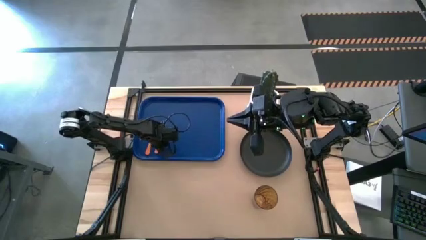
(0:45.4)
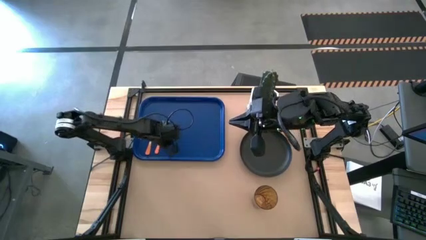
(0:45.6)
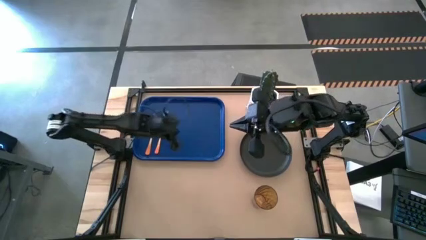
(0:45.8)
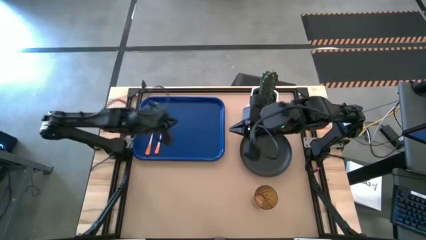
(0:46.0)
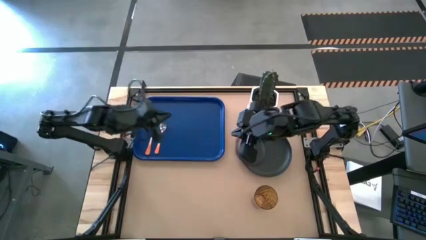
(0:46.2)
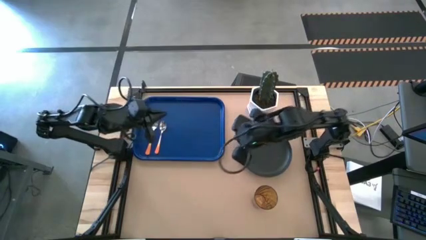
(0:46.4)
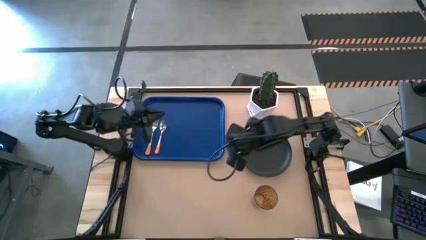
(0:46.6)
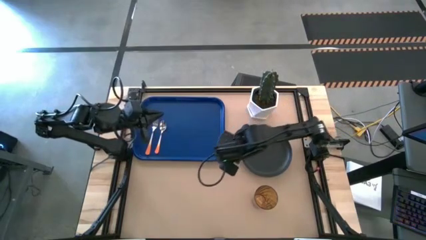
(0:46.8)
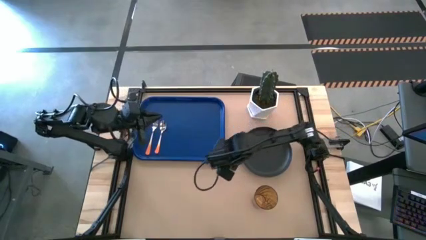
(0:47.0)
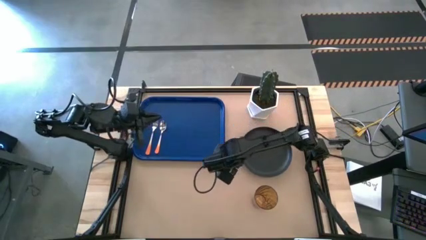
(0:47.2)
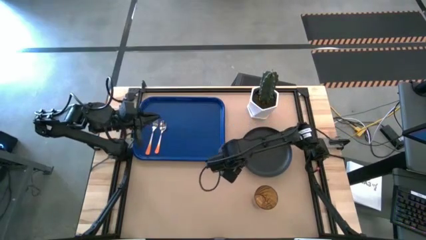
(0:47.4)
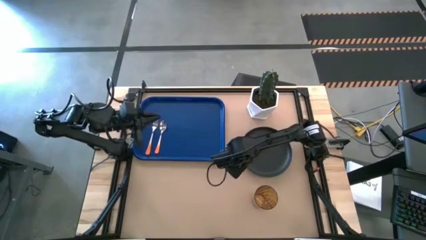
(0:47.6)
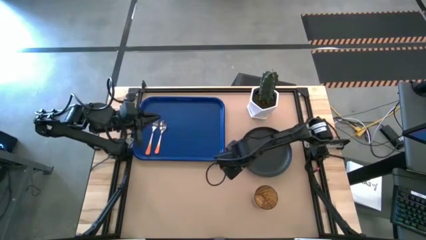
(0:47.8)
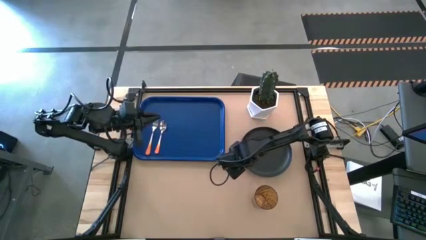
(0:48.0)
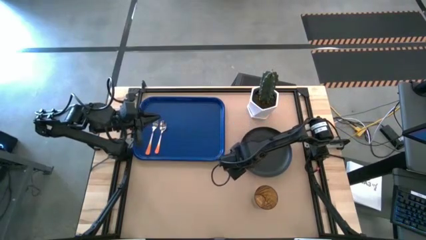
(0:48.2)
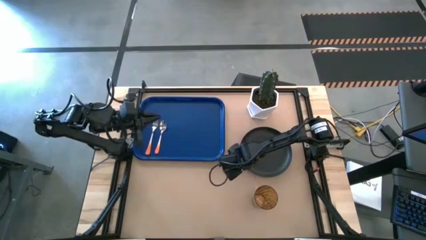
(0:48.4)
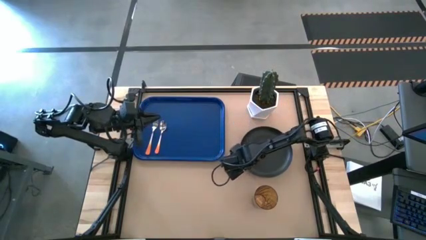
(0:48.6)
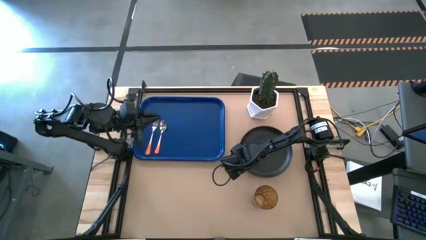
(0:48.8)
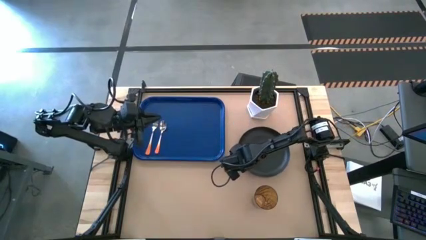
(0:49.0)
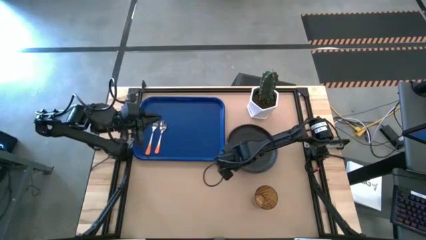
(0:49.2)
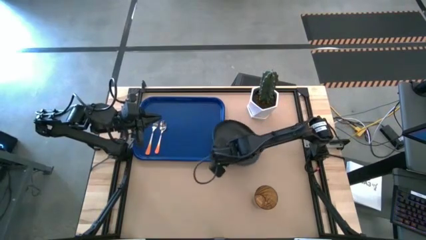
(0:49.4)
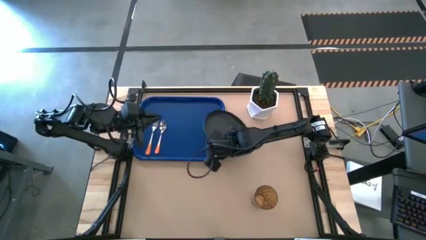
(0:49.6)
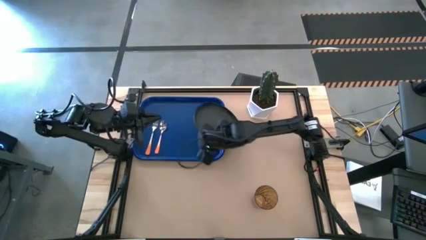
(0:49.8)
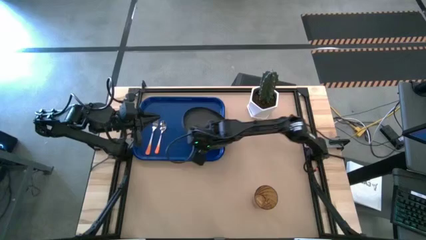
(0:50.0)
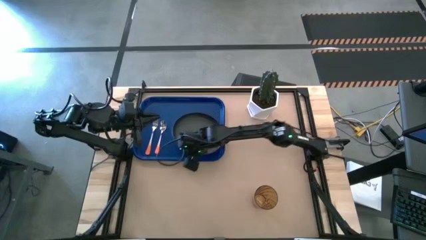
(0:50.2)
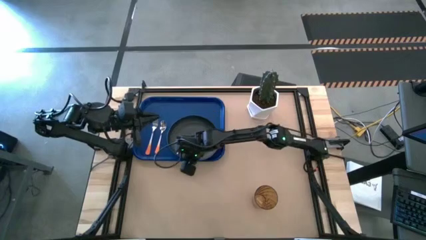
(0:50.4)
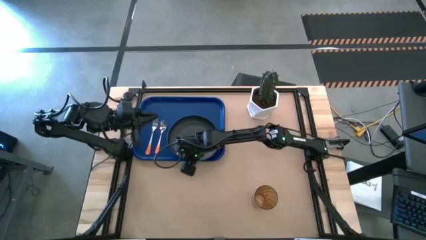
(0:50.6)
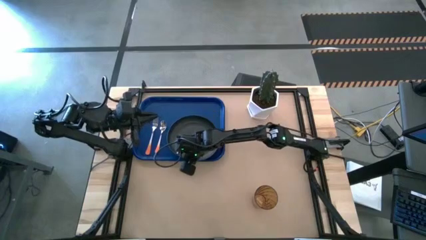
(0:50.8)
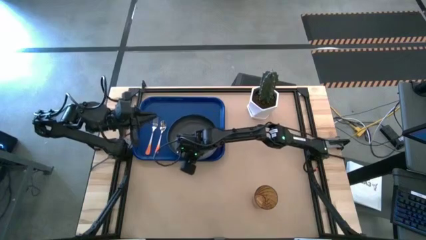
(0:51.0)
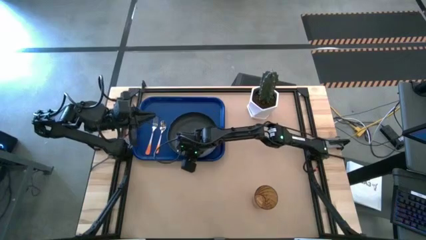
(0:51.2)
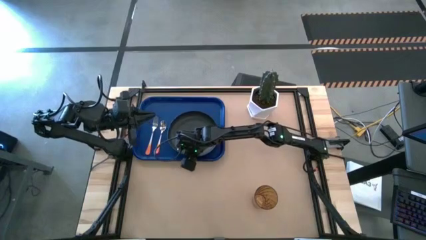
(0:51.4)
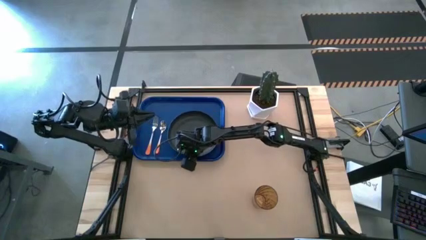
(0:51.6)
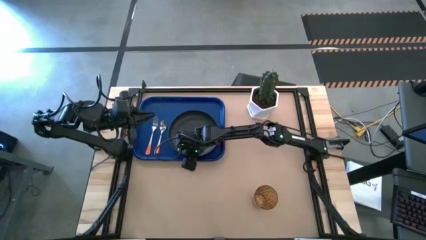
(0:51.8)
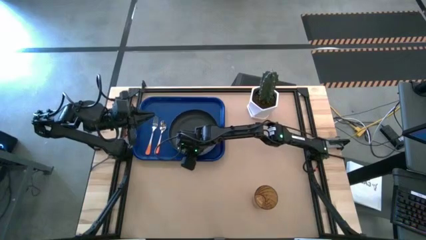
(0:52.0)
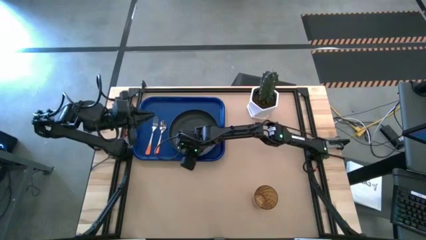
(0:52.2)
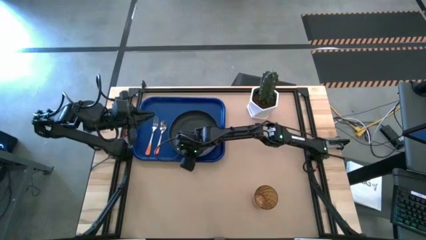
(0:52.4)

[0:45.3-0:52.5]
Task: Pick and place plate/cup/fork/spoon on tray
Put the black plate on the blue tray on the right of the orange spoon

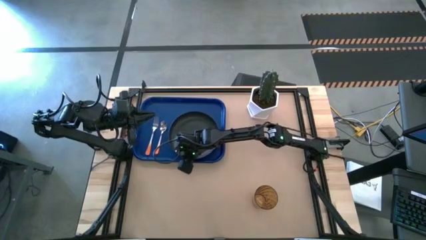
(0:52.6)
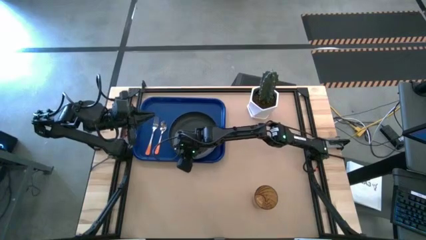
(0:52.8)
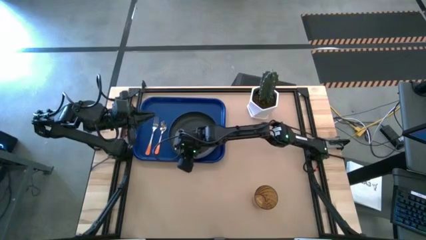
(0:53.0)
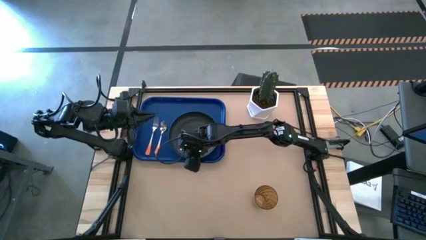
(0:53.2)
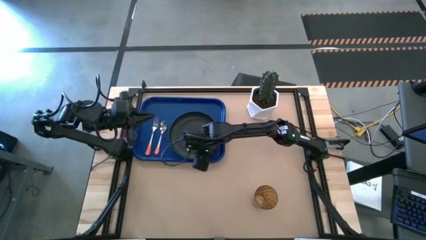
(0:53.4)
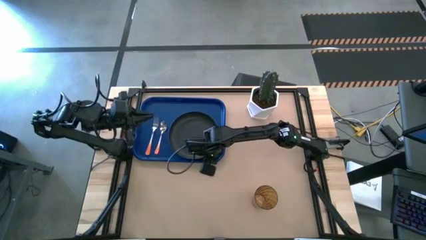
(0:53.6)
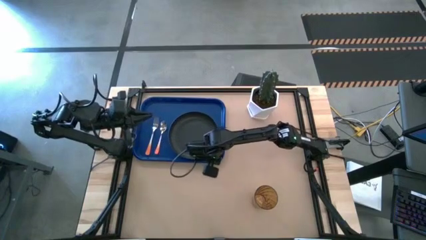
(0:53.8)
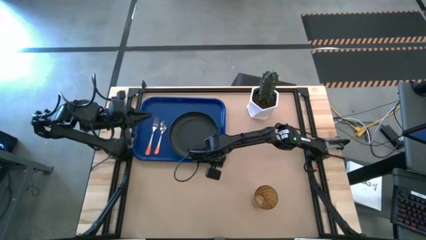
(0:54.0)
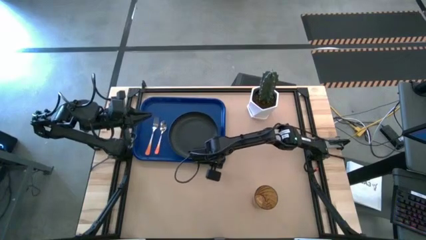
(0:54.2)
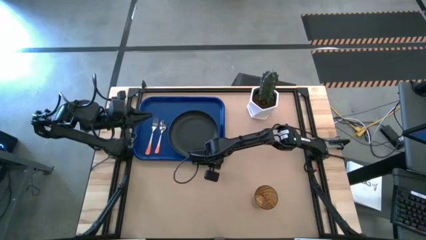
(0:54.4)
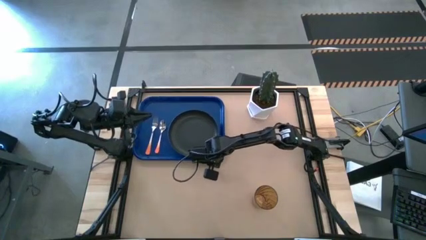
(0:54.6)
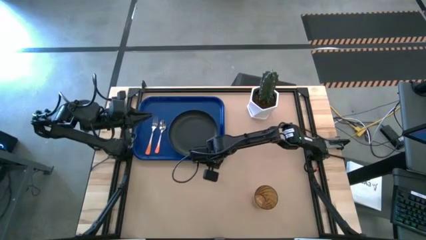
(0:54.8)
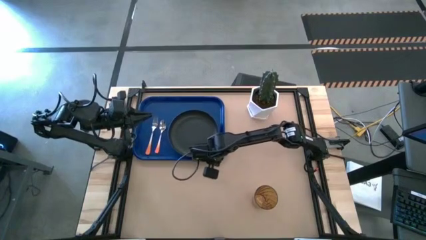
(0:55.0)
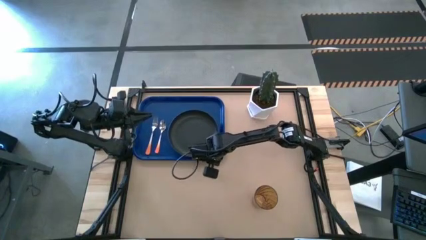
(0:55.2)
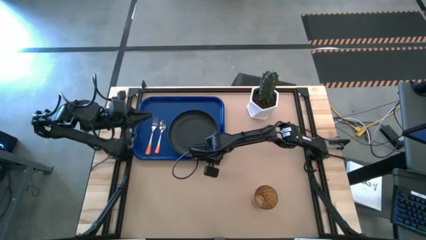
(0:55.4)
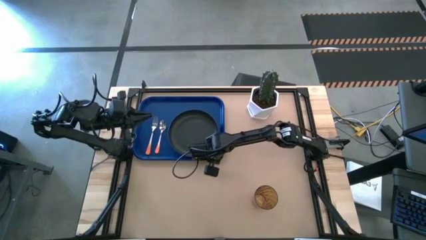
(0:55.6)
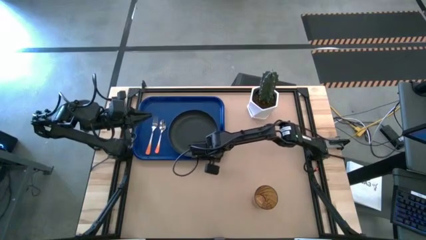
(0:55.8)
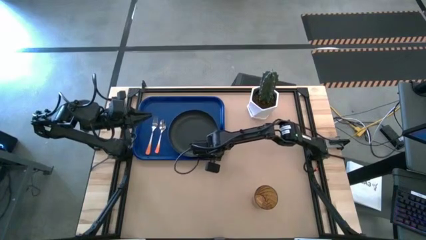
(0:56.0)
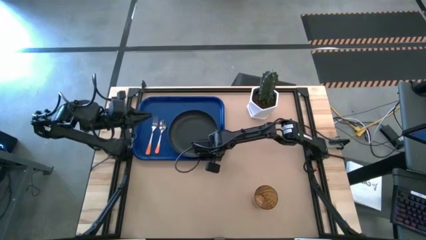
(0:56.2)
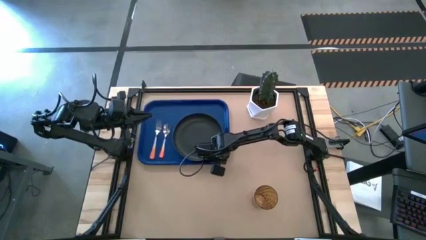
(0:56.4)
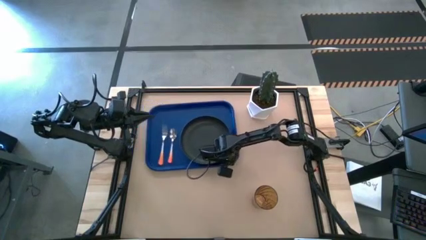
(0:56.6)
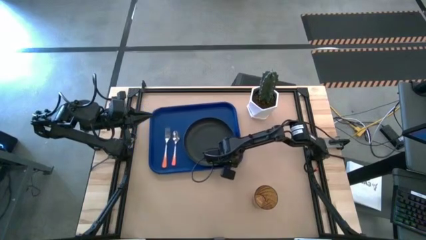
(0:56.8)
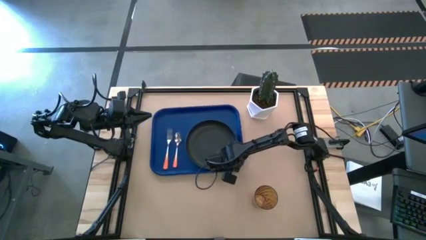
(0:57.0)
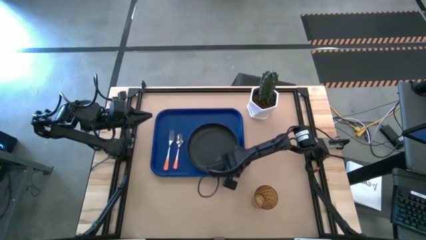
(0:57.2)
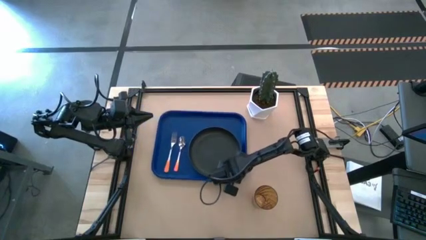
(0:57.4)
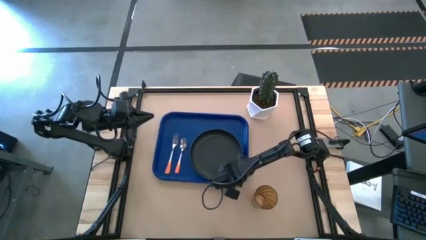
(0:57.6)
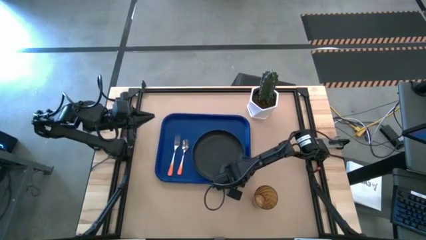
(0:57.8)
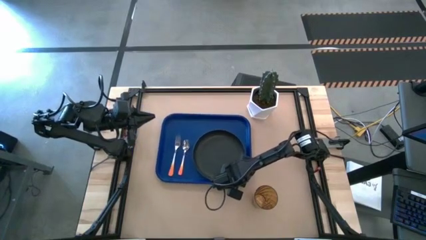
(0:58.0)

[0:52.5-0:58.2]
Move the blue tray to the center of the table

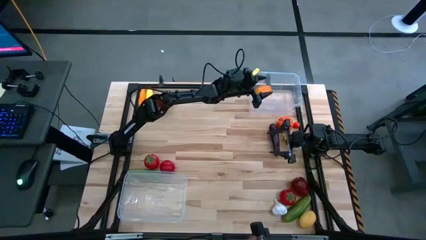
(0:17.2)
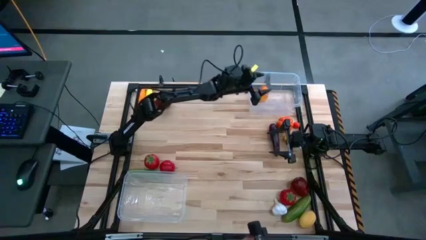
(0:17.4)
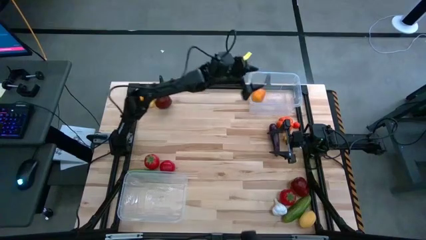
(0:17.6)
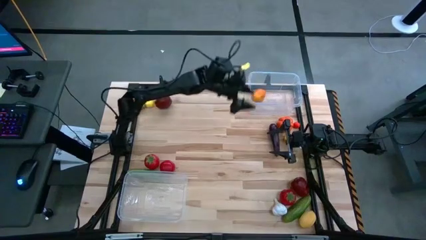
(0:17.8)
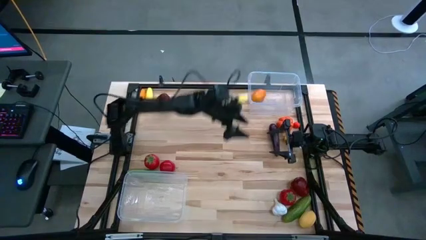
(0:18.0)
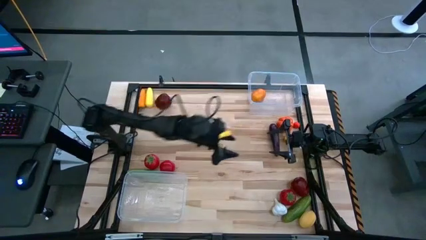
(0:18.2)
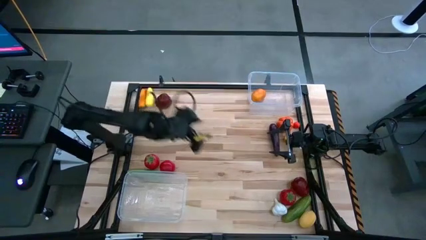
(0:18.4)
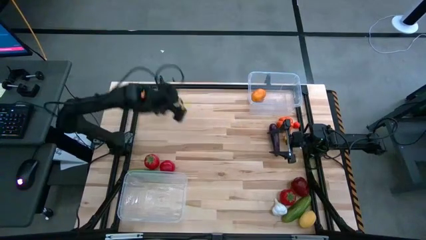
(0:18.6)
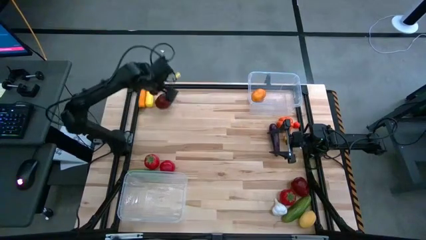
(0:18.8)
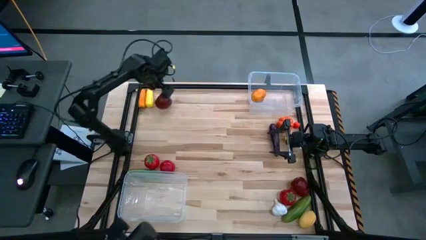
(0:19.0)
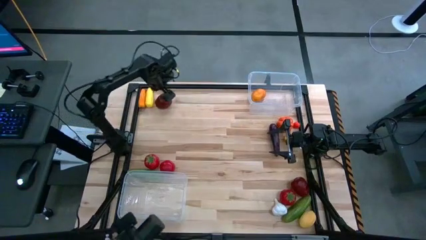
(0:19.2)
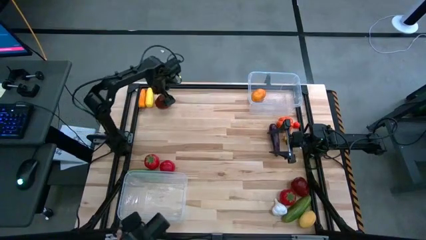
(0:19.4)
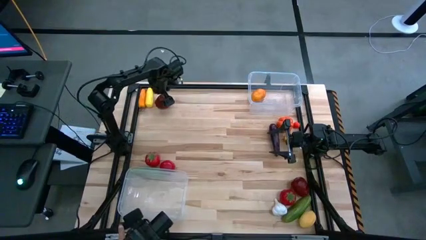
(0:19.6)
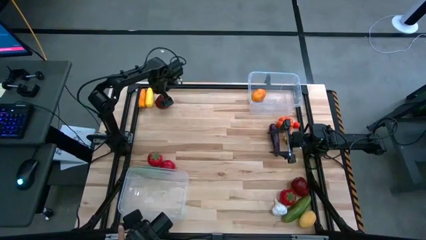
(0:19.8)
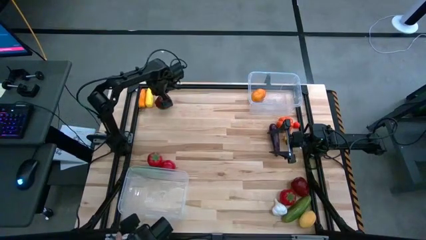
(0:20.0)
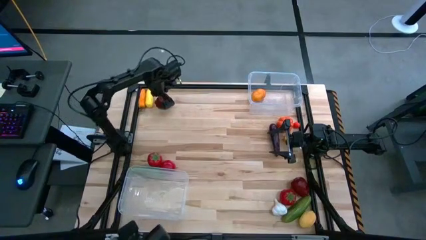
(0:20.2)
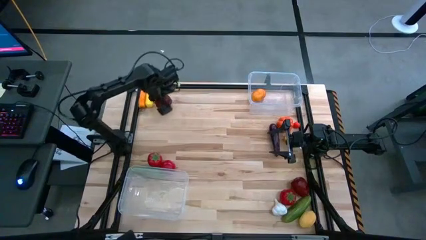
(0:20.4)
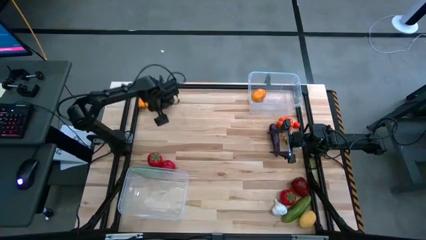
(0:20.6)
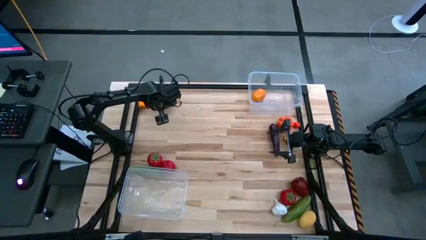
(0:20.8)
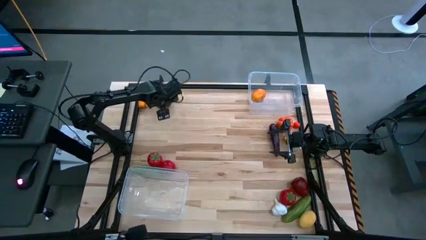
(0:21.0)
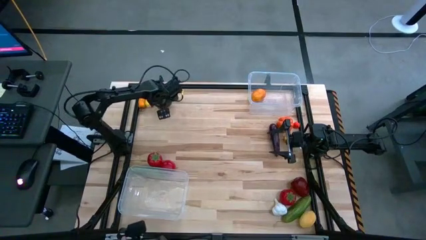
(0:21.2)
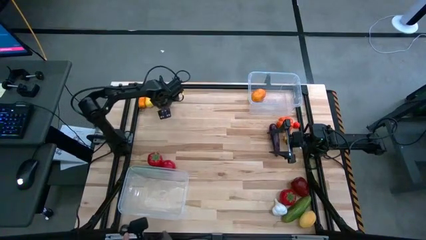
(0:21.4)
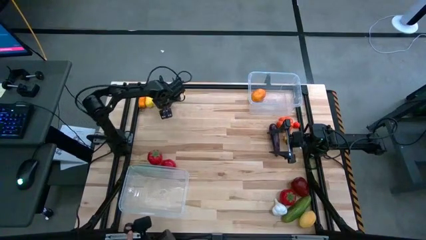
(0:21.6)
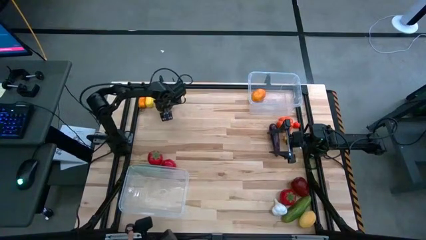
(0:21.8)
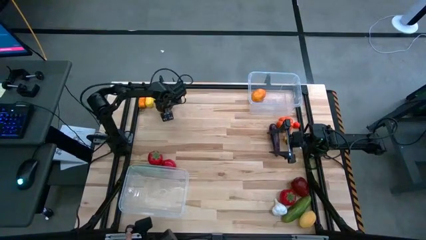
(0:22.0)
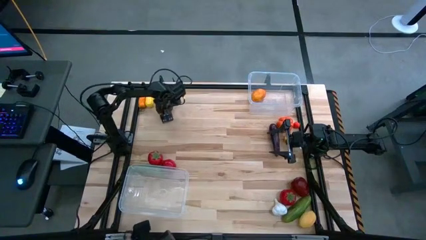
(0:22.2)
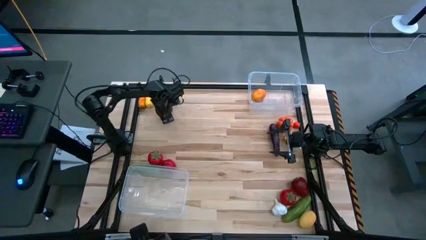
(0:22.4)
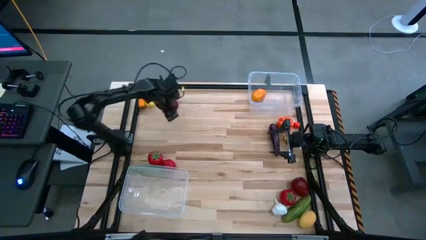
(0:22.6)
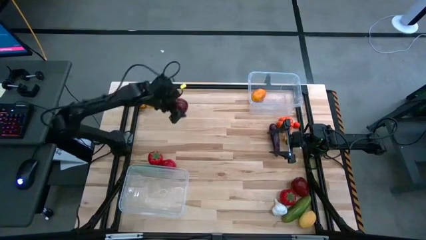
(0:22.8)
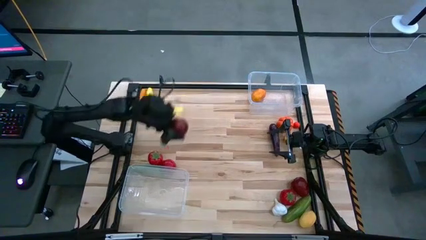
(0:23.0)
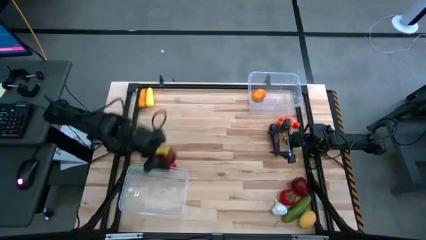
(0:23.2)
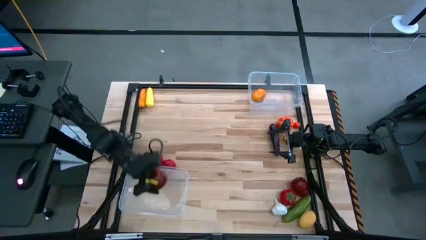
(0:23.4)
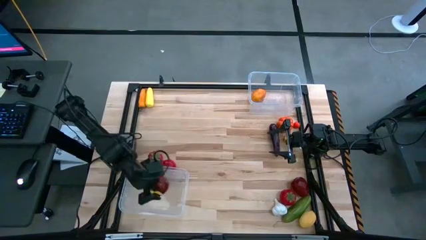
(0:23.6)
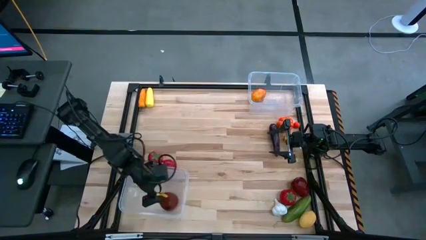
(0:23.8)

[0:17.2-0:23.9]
Task: Sort produce into baskets
Put the top red apple into the bottom transparent bin
